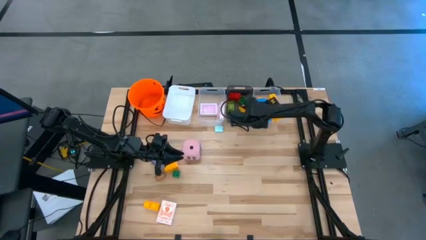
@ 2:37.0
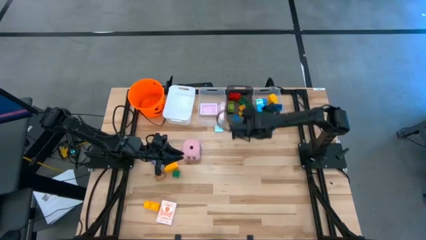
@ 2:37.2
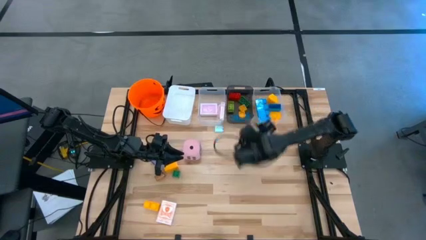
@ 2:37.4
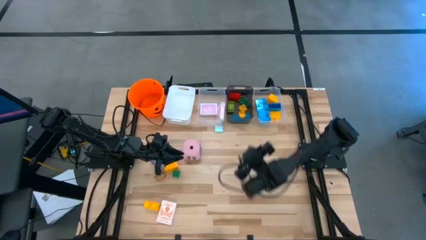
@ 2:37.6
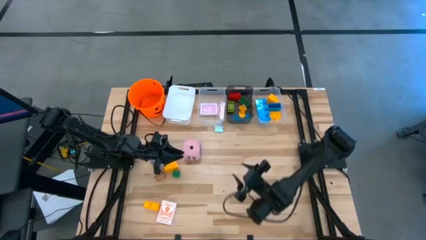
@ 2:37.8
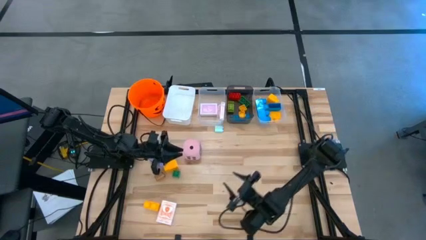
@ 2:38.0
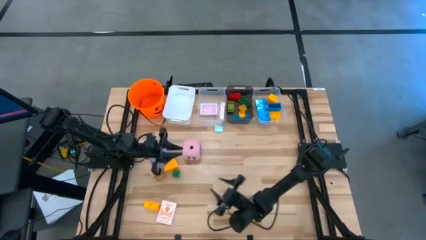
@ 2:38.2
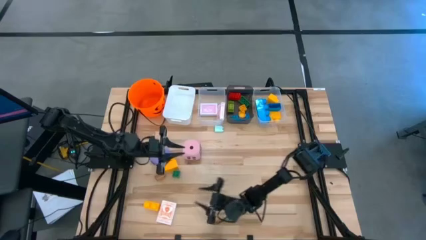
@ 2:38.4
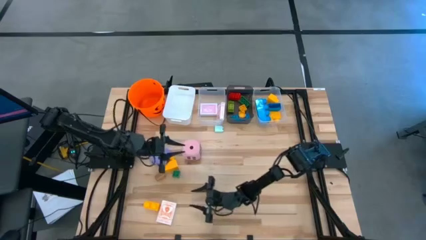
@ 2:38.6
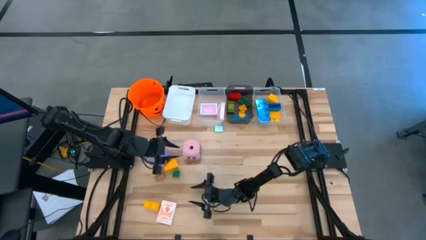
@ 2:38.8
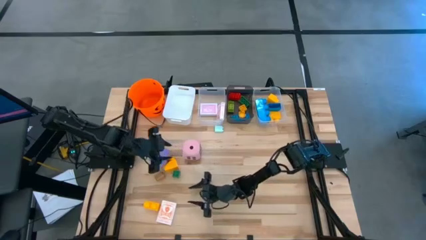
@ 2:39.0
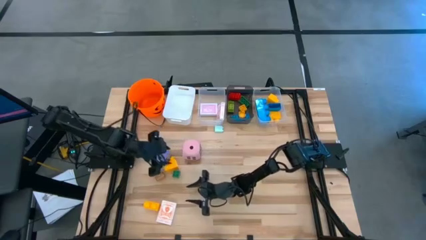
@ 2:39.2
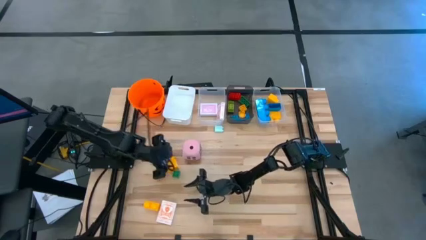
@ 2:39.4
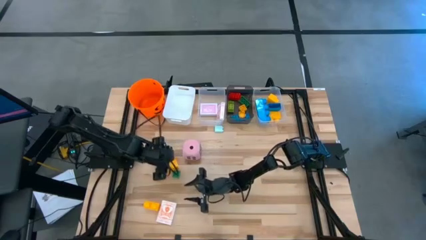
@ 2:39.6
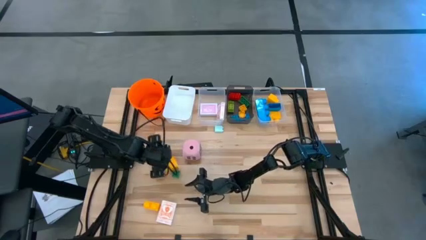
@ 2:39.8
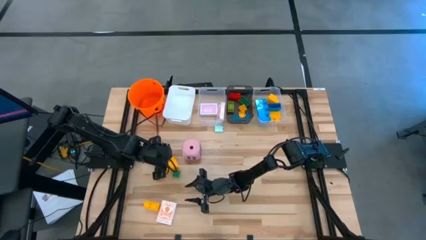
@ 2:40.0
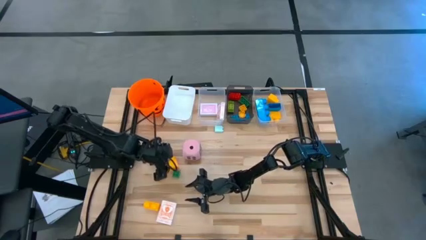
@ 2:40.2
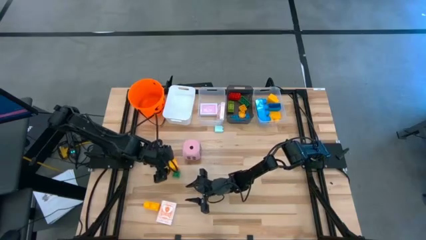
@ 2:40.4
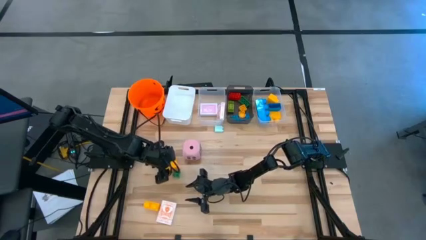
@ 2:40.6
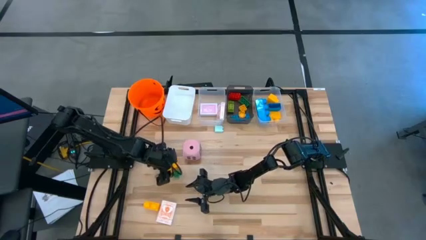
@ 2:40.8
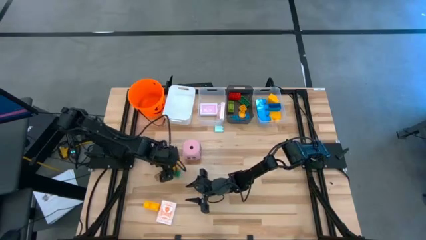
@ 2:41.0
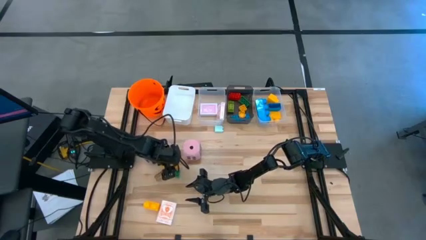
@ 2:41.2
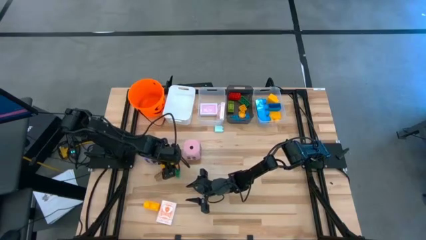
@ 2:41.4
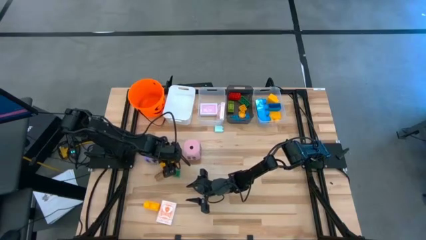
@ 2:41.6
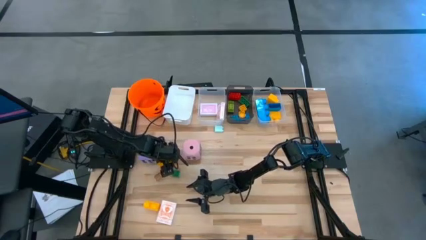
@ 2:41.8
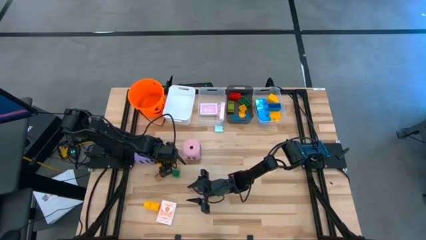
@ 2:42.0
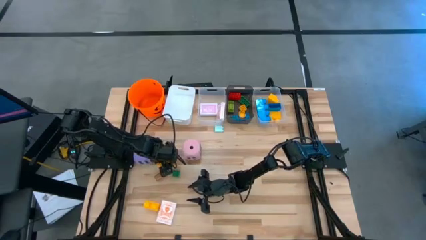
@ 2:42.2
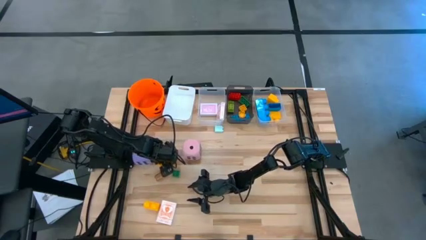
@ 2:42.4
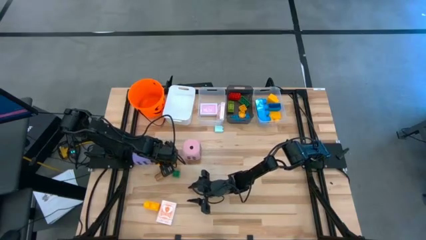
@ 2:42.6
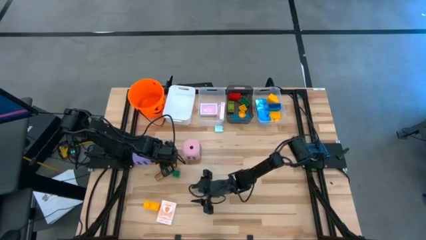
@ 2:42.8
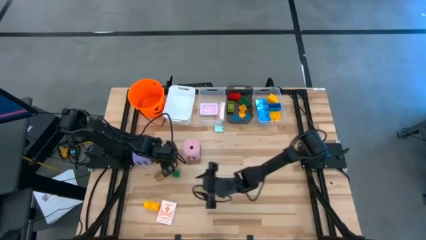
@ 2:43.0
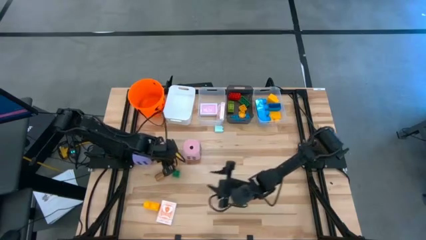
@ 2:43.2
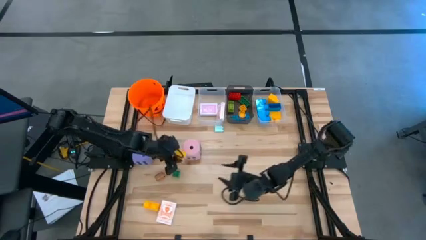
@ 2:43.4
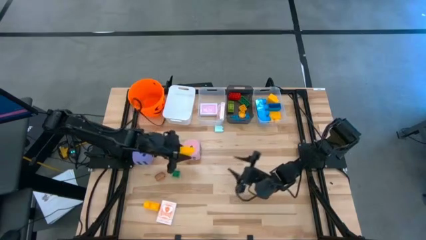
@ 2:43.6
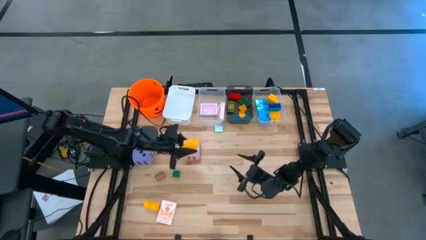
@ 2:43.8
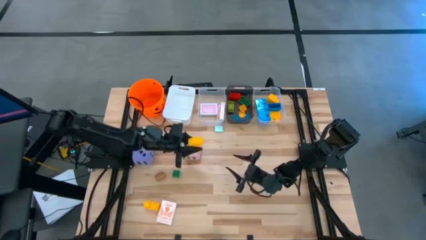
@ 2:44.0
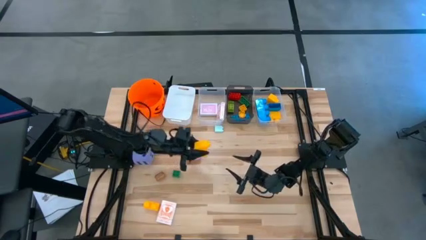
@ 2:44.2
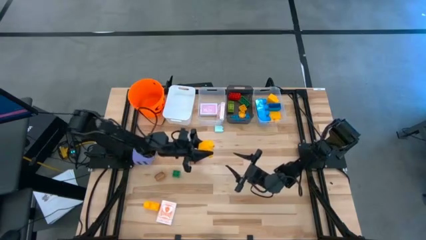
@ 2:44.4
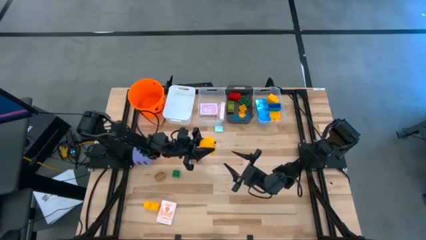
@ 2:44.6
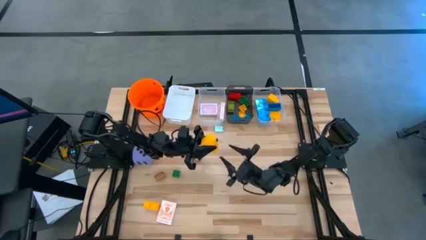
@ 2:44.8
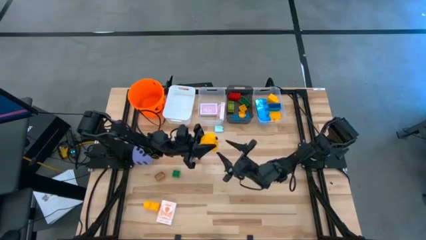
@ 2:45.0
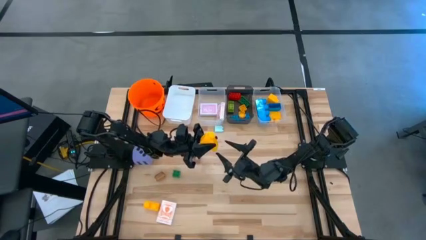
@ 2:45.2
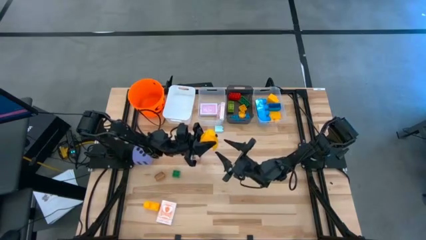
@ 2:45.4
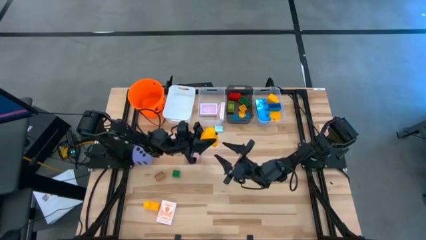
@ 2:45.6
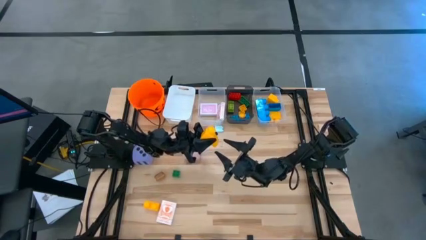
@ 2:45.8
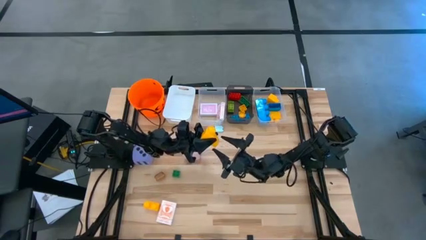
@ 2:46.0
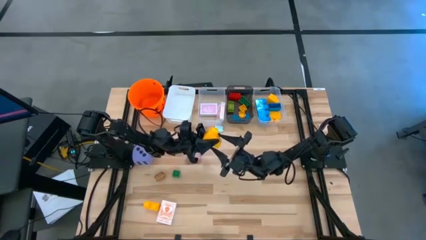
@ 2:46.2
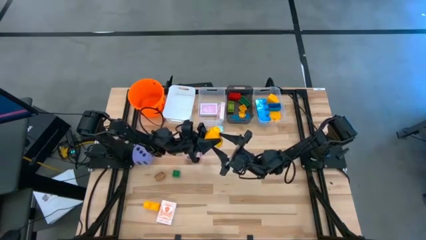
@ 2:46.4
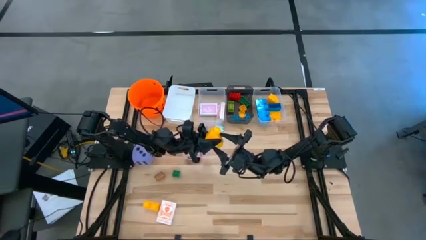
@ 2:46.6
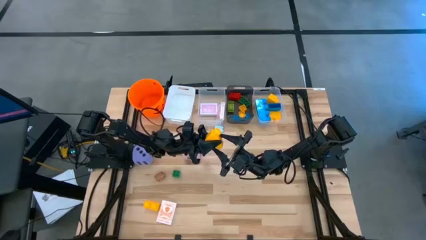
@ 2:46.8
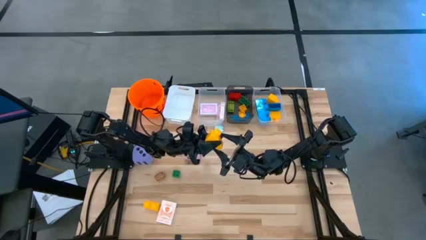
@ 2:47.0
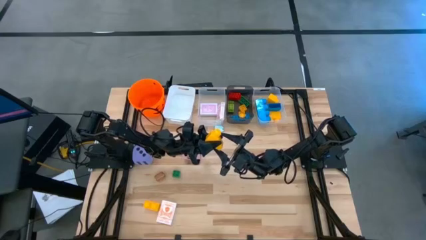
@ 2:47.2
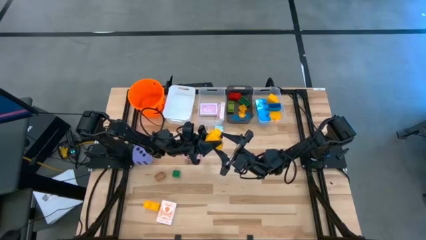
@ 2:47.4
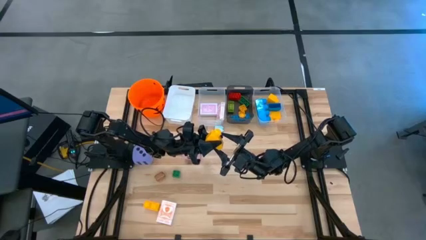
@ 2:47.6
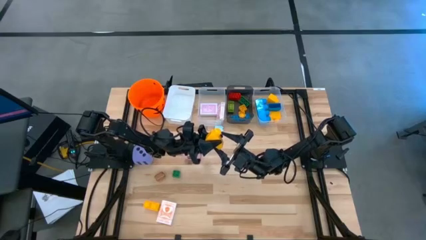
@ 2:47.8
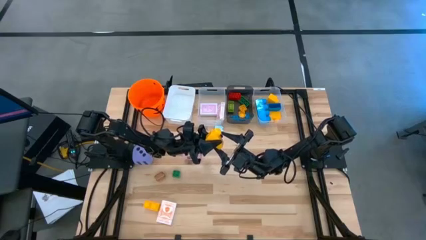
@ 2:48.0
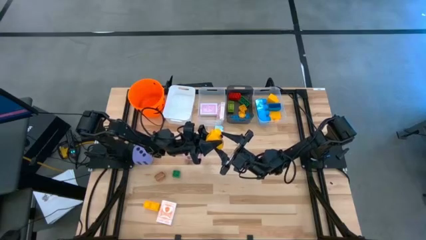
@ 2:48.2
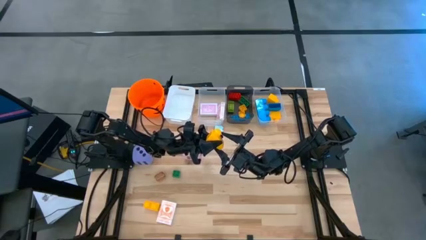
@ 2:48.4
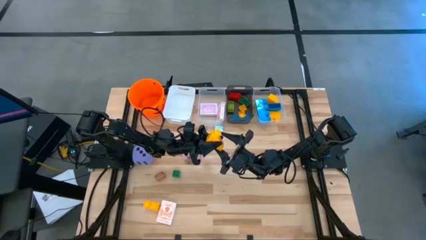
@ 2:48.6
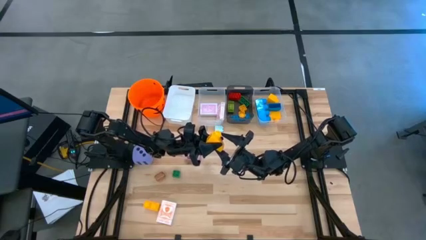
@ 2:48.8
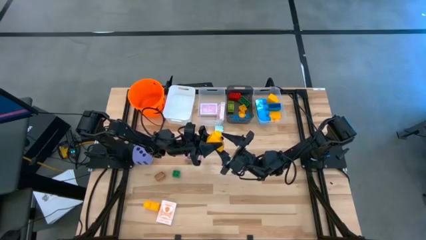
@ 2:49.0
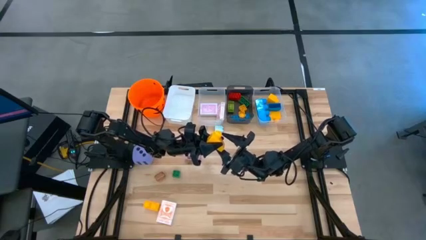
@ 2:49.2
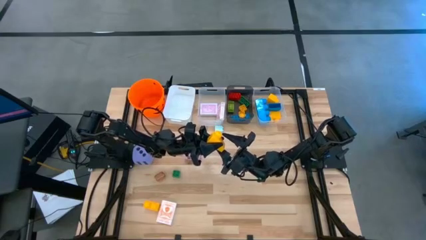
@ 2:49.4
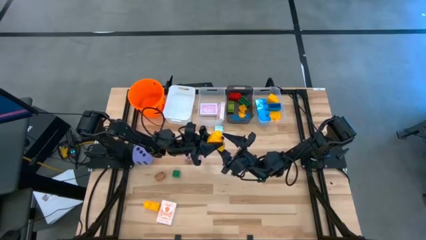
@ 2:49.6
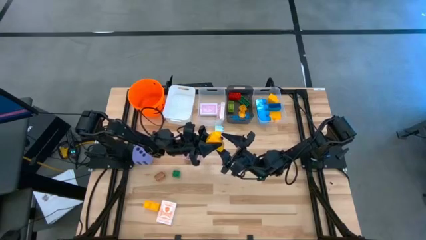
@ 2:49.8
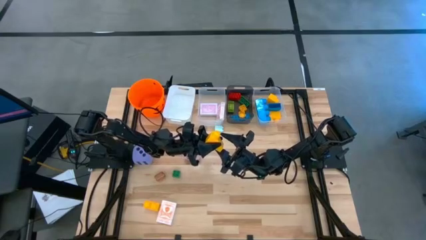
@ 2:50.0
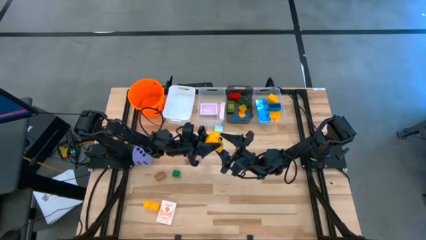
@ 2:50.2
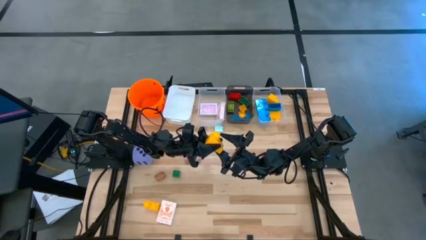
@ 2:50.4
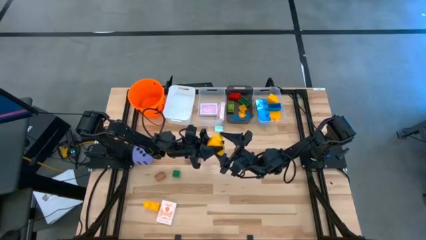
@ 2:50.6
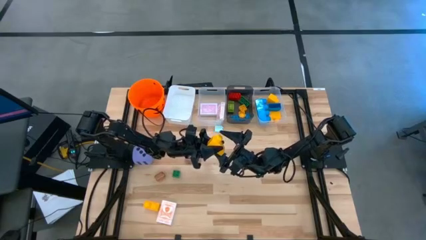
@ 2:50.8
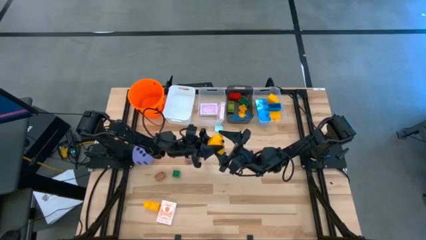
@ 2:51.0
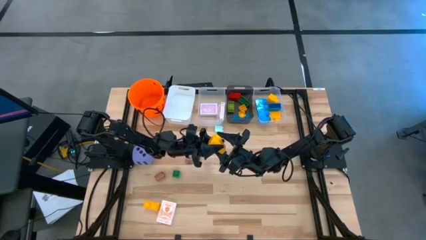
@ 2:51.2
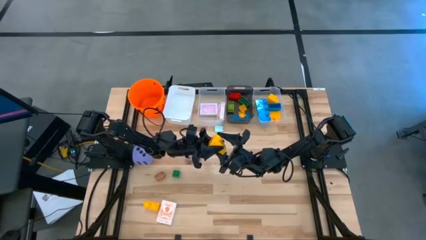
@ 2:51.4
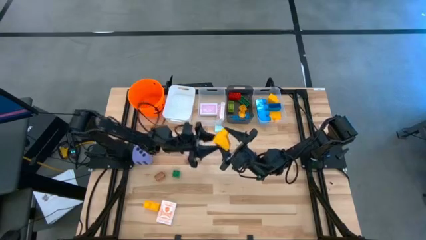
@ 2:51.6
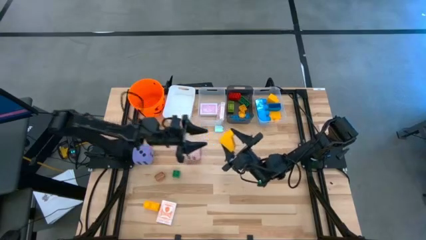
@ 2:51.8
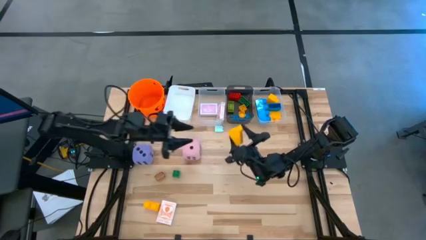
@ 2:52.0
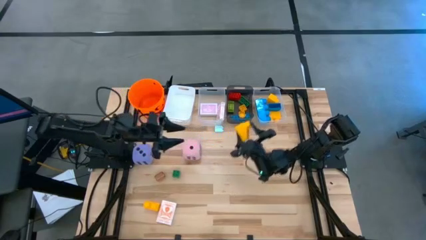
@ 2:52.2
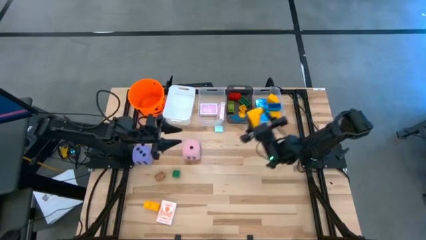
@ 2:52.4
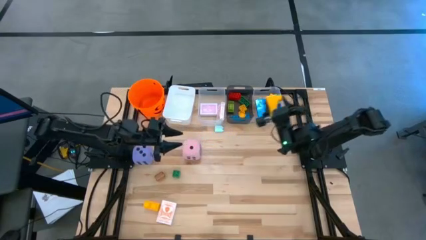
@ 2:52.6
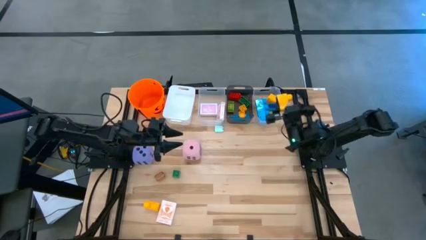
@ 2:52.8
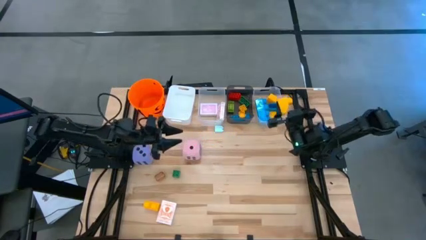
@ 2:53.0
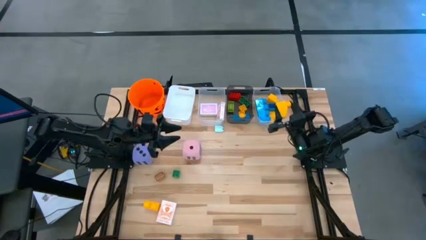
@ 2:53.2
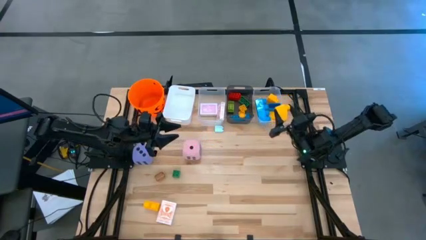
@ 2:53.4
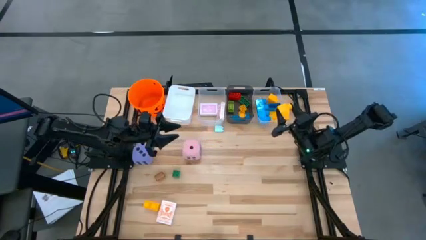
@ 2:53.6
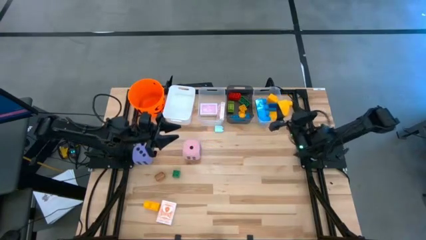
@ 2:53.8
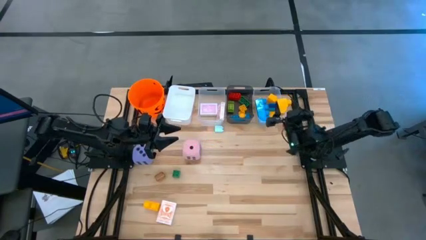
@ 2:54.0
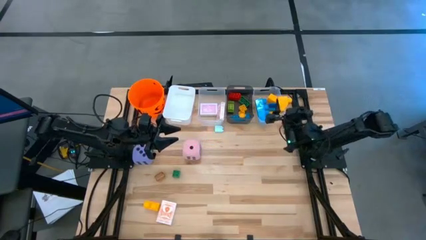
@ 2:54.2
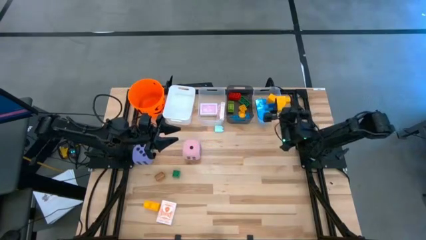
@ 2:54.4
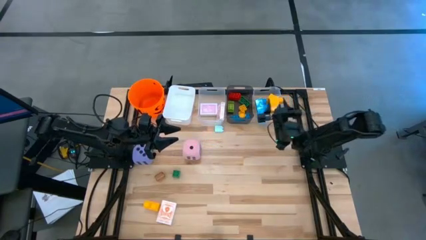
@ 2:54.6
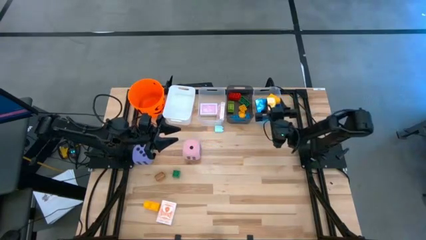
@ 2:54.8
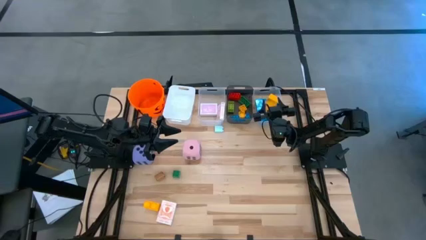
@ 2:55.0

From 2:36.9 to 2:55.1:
Task: Pick & Place Toys
Put the big yellow game piece into the right transparent bin
